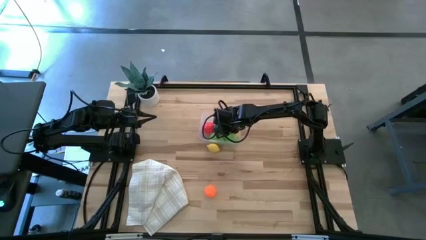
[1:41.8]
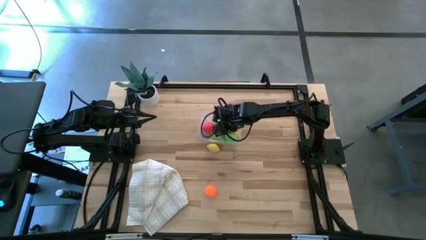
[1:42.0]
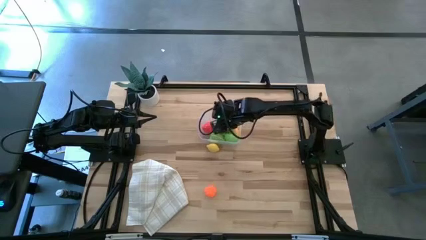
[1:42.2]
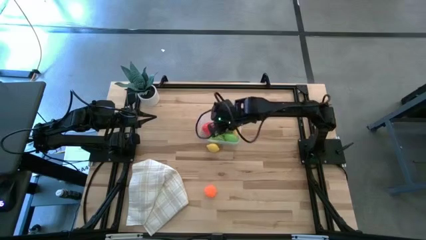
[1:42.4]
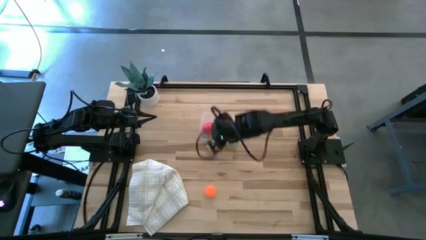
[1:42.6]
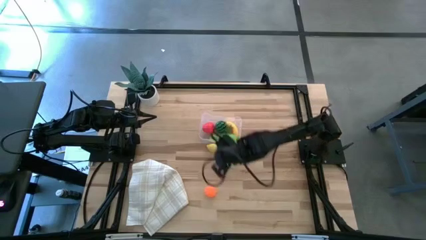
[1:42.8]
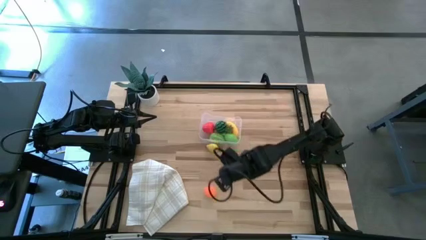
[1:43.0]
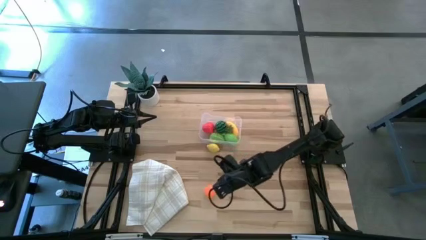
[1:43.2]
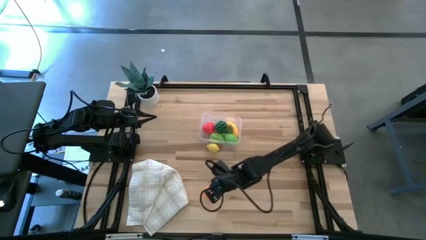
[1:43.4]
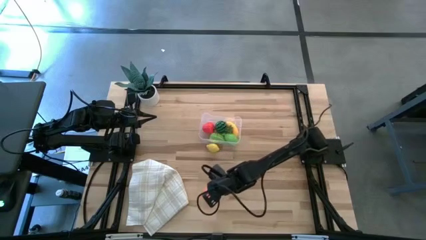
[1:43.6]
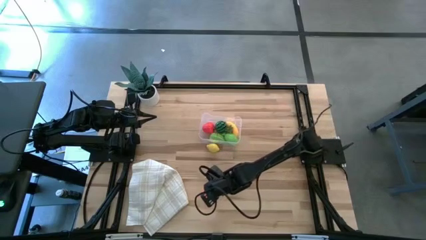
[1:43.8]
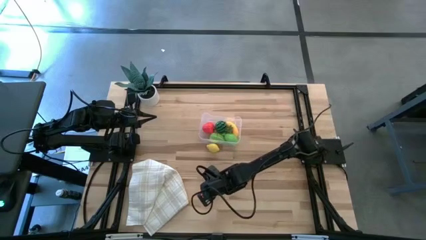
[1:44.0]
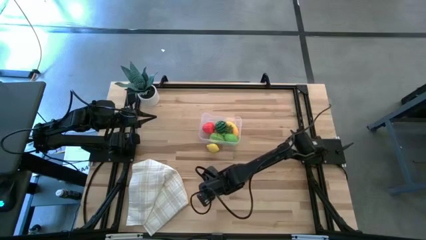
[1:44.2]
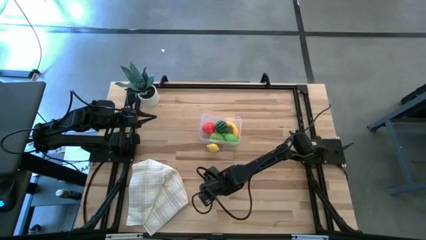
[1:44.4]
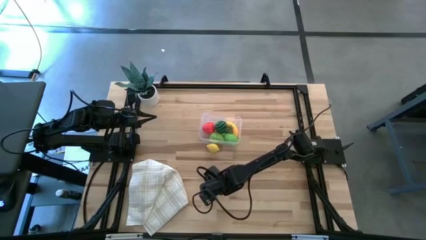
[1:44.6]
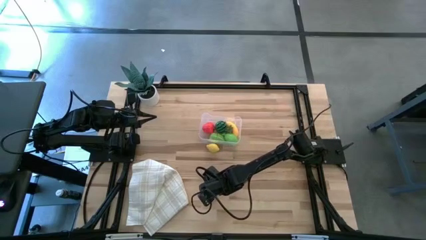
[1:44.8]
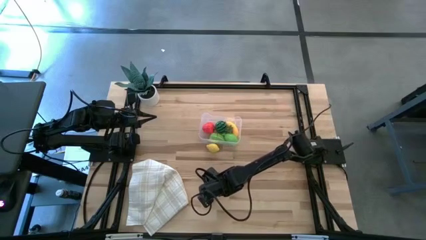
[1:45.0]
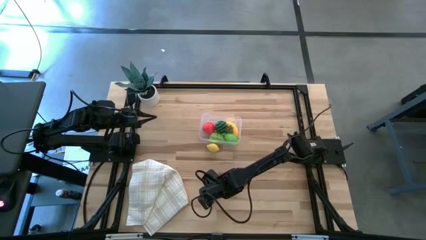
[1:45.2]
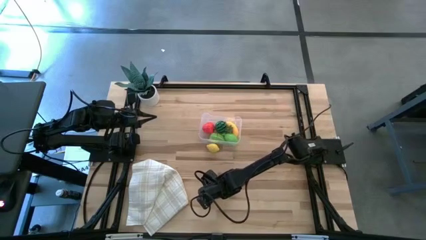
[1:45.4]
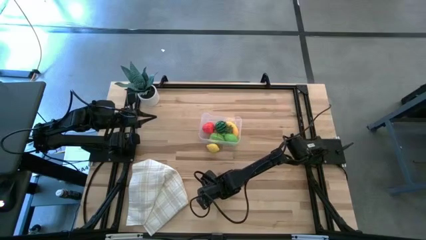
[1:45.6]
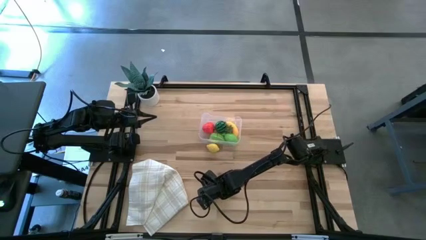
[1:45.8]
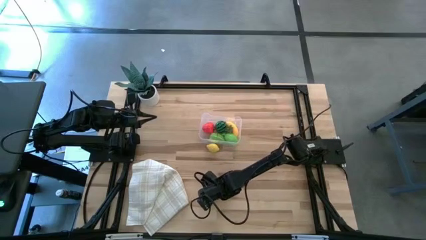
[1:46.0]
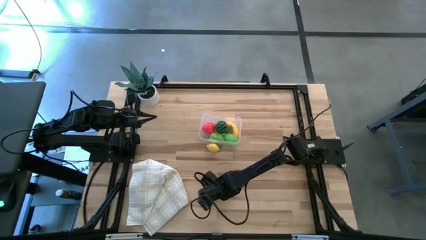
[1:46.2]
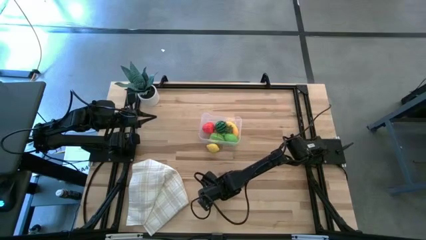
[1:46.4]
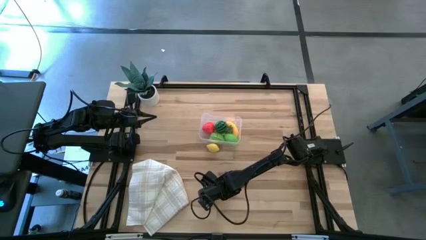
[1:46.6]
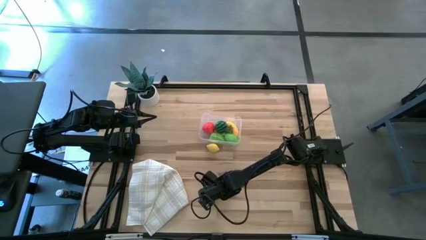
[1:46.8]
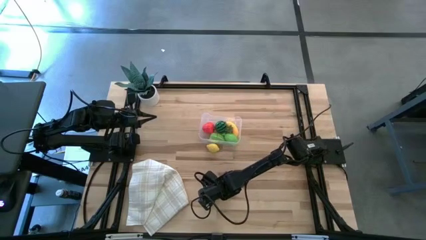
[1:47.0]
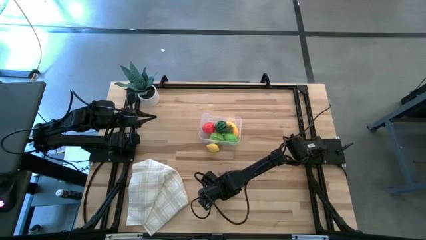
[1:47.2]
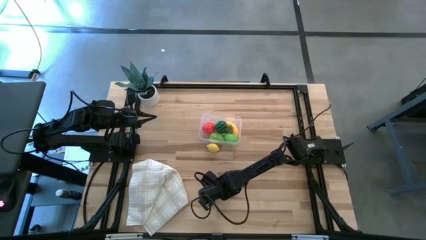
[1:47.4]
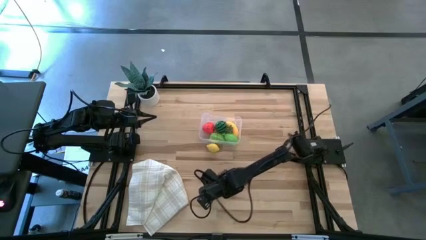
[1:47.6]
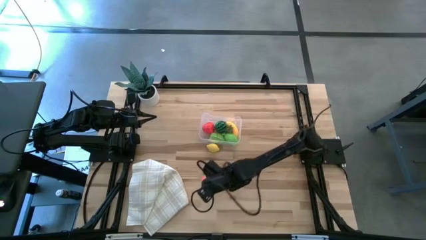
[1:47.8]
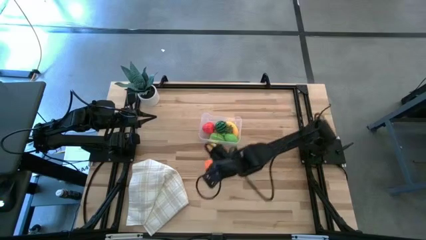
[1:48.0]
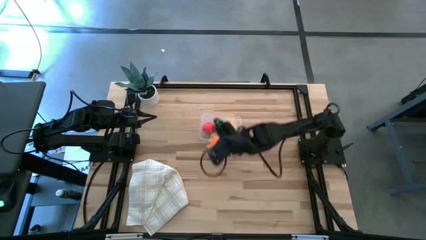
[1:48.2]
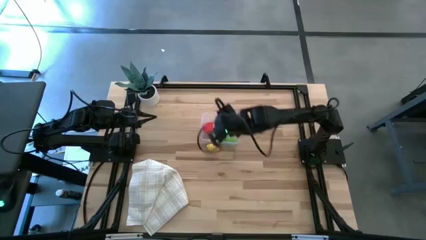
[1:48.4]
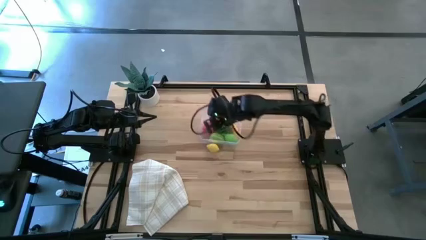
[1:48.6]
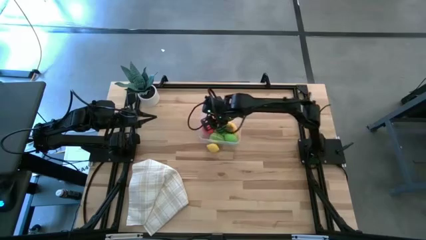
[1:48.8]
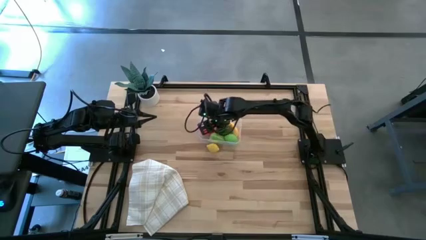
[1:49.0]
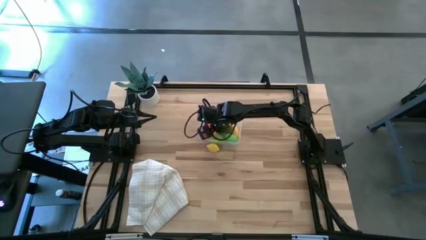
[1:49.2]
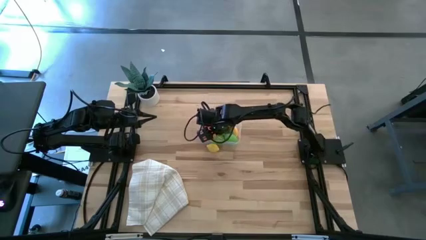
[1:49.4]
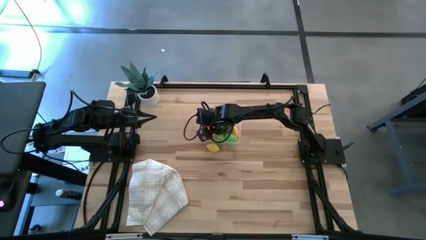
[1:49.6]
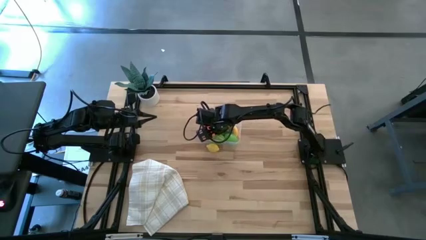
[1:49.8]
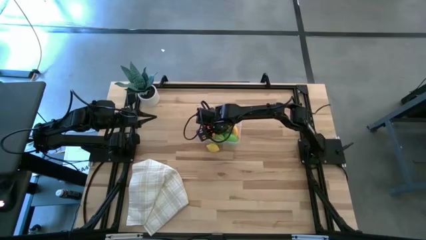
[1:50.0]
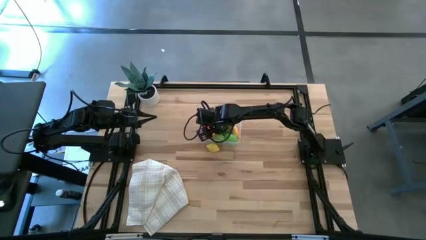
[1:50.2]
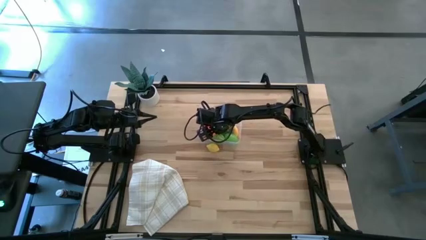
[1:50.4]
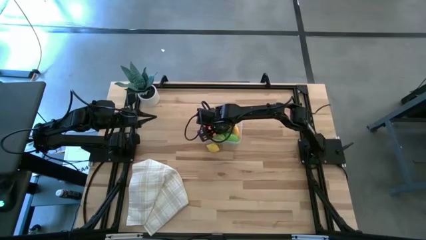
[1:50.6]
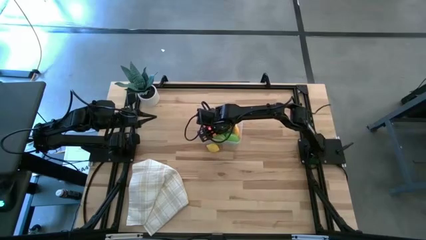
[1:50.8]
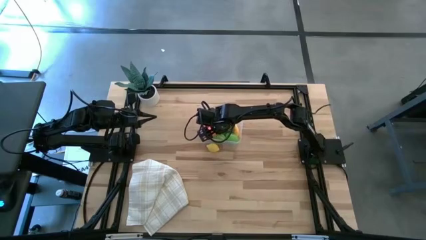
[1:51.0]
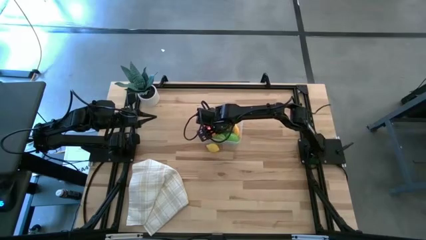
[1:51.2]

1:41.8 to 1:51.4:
Task: Pick and placing Produce into tupperware
Put the pumpkin into the transparent bin

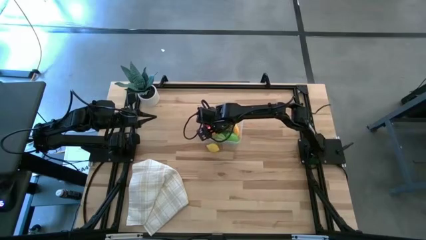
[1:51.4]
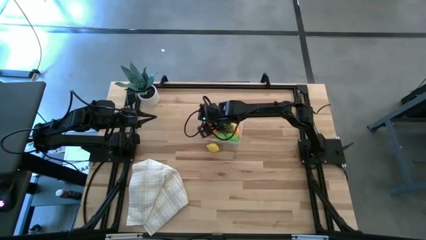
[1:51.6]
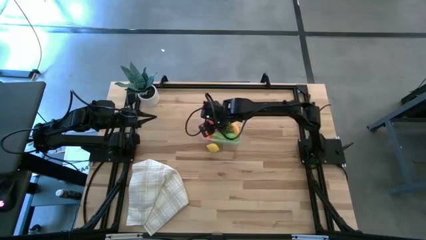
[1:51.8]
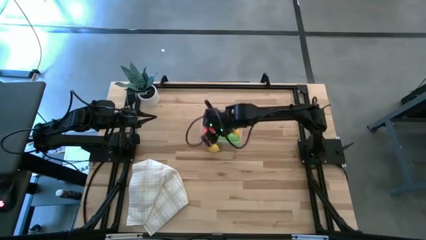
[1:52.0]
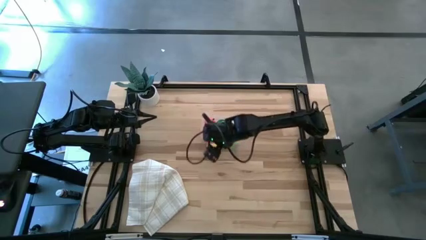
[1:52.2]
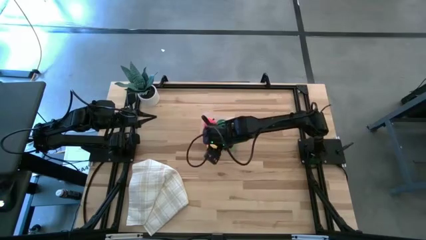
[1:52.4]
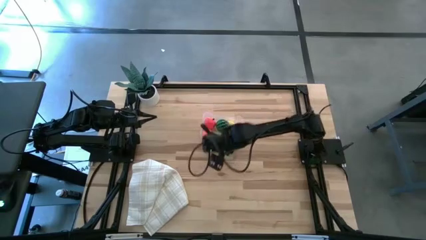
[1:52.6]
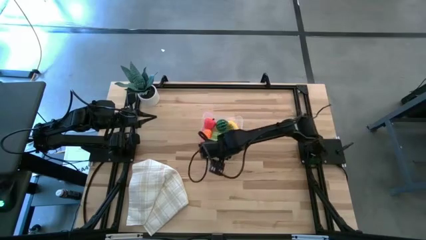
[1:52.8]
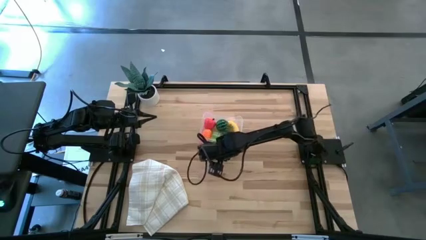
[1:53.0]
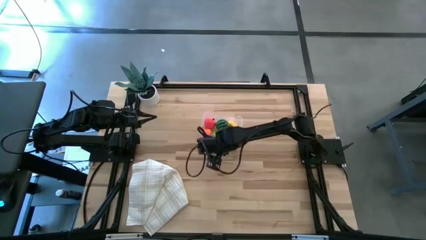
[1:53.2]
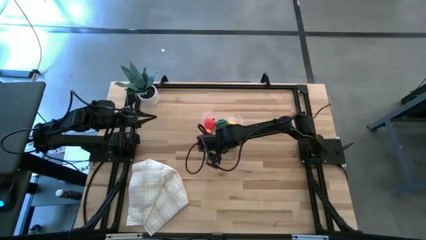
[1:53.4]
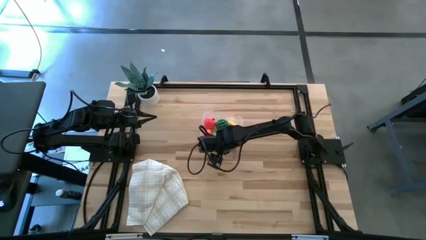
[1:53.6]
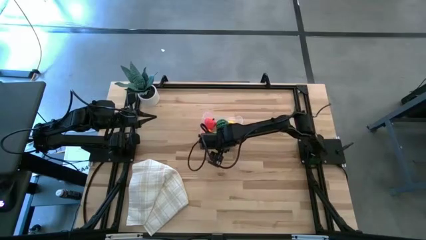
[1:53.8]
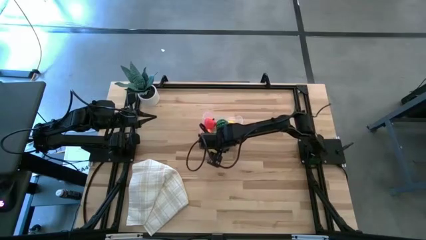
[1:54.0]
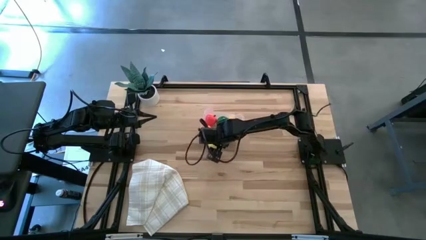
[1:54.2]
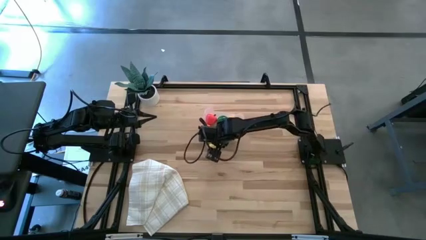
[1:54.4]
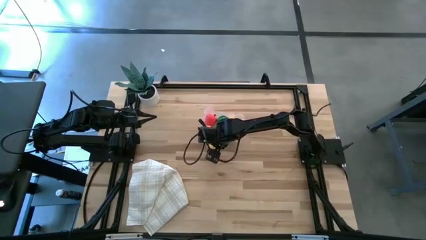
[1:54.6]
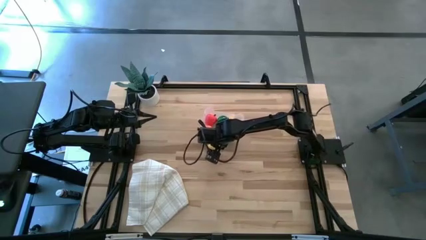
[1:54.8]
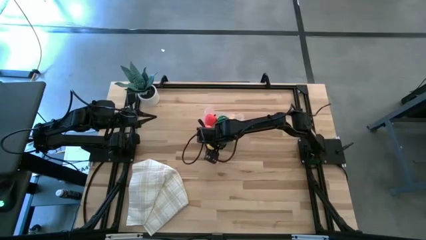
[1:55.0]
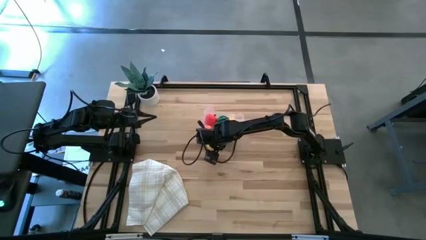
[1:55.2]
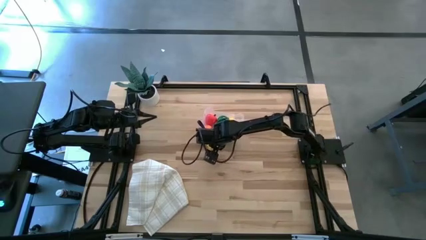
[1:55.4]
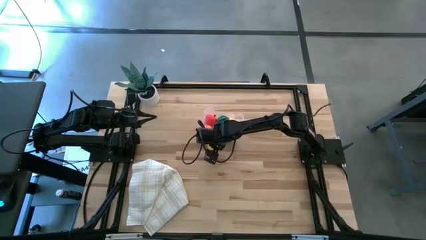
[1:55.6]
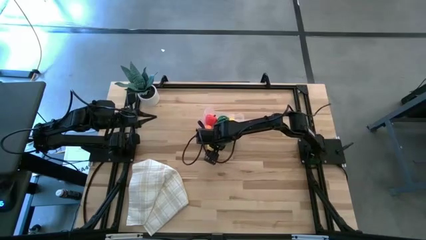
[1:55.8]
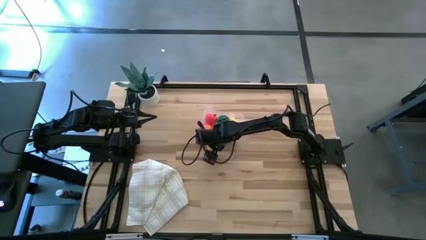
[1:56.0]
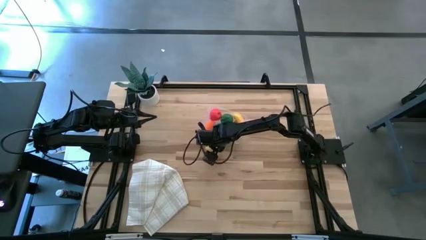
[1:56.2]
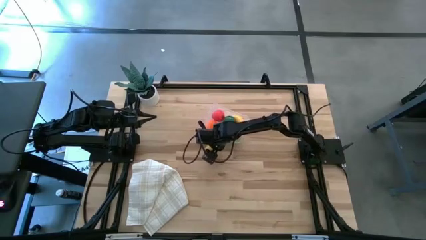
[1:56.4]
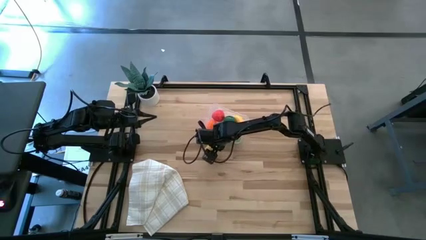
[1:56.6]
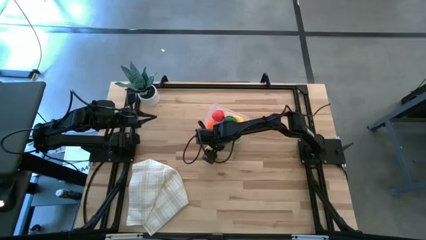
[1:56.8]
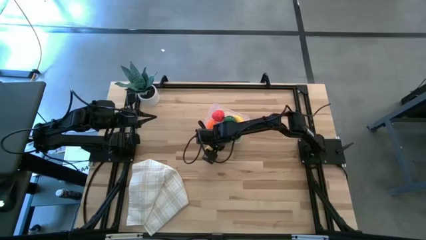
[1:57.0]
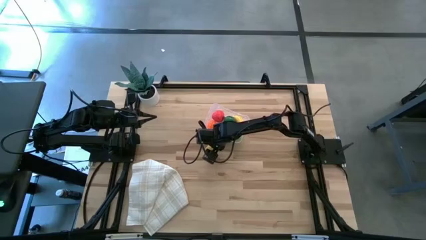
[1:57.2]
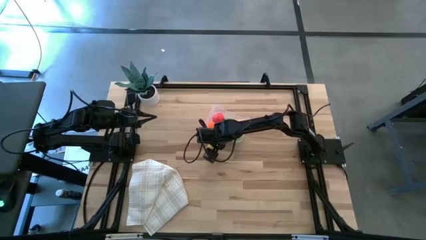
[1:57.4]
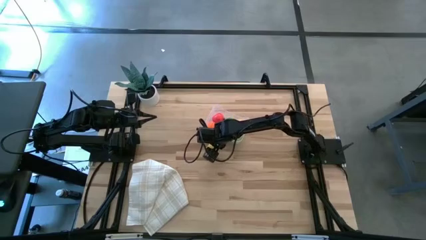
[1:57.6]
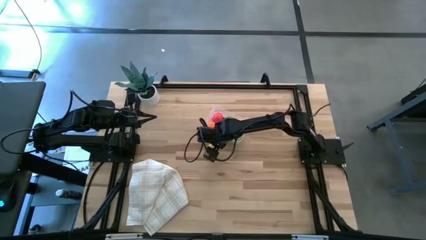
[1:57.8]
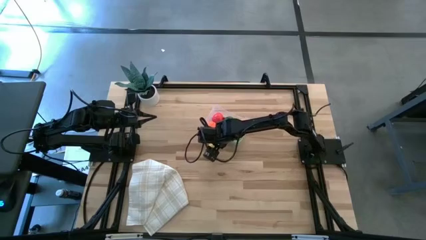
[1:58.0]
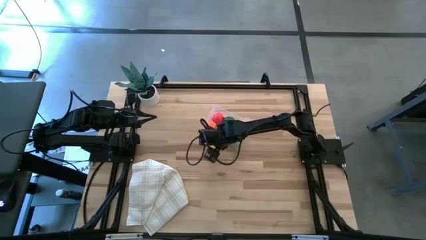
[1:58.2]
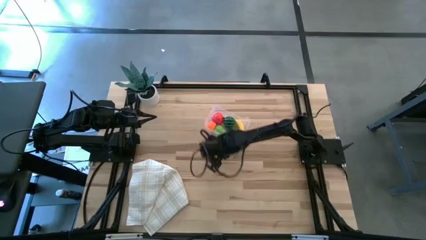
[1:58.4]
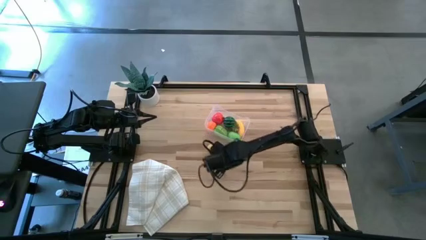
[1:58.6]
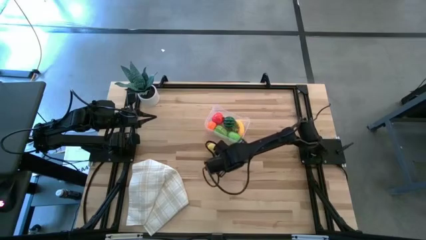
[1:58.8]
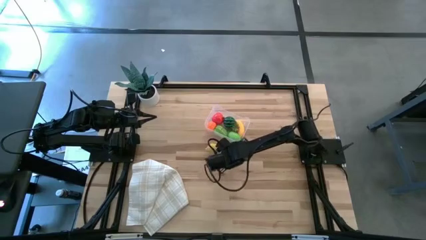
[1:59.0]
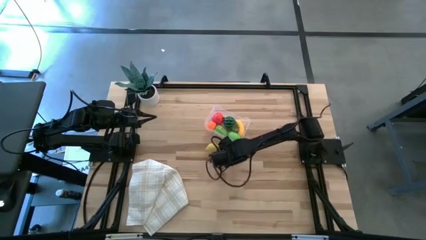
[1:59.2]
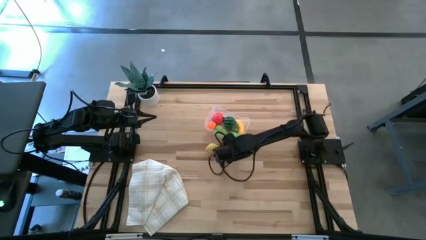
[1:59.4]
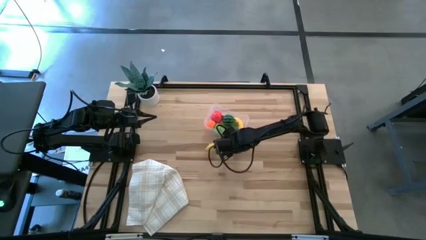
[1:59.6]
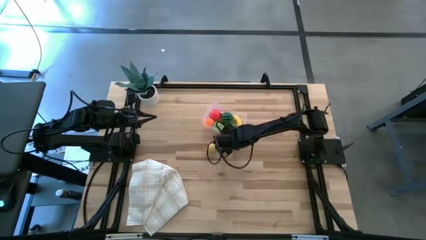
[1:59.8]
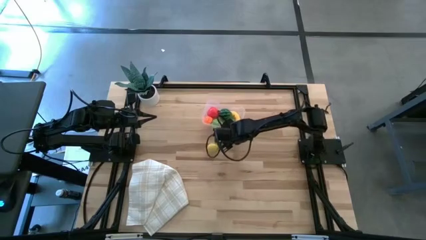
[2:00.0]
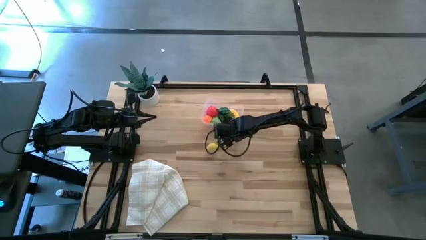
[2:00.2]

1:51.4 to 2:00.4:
Adjust the transparent bin
